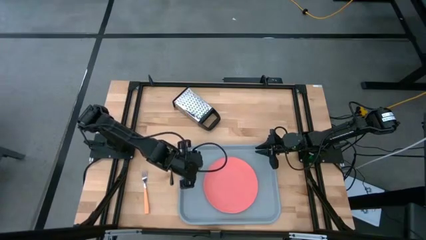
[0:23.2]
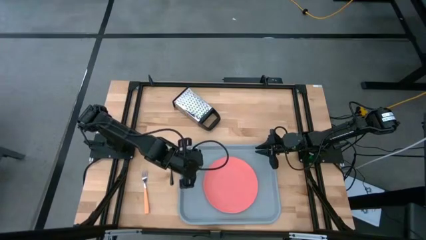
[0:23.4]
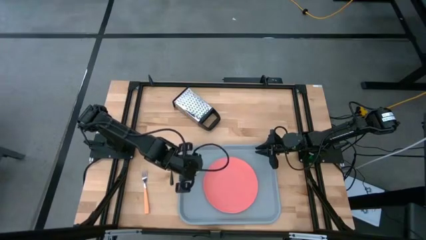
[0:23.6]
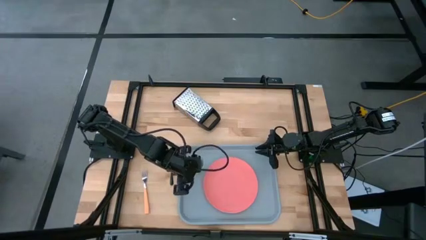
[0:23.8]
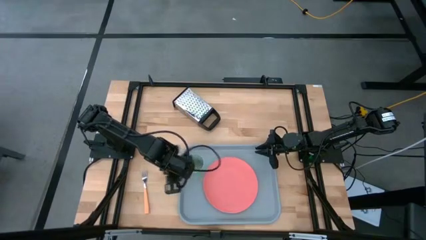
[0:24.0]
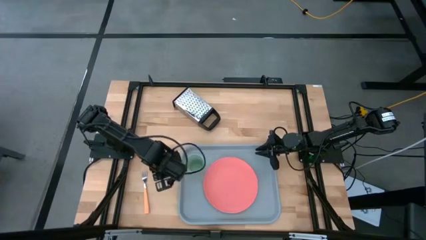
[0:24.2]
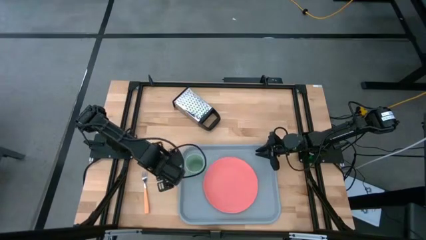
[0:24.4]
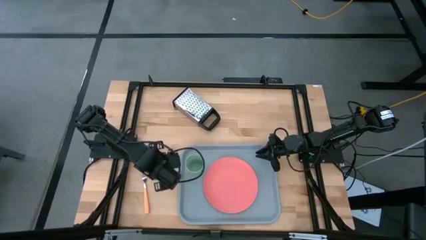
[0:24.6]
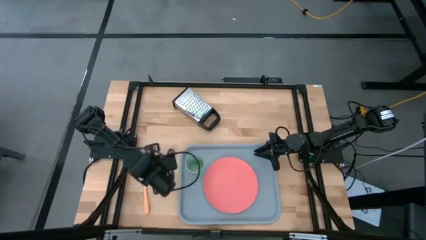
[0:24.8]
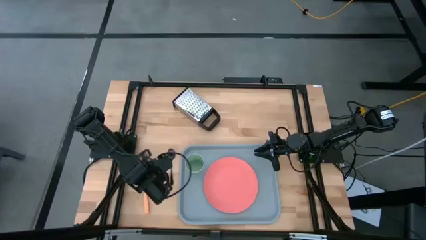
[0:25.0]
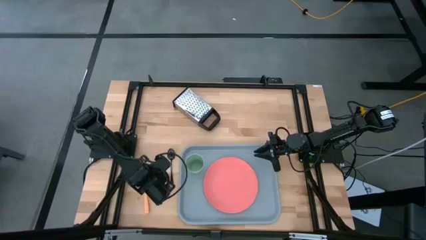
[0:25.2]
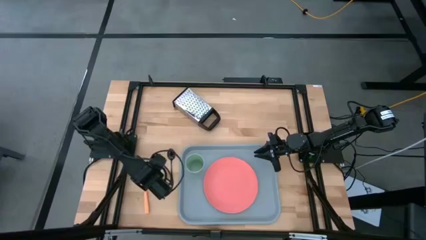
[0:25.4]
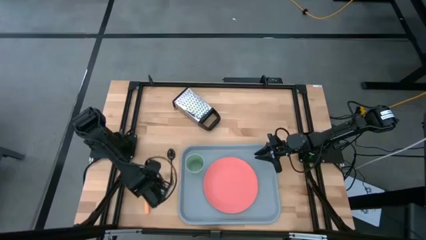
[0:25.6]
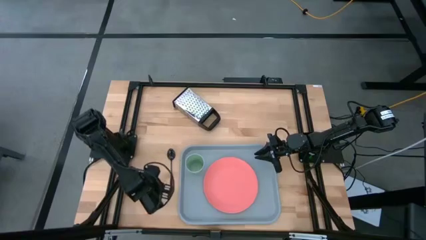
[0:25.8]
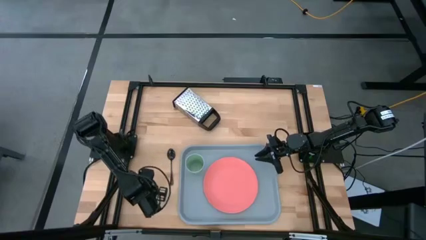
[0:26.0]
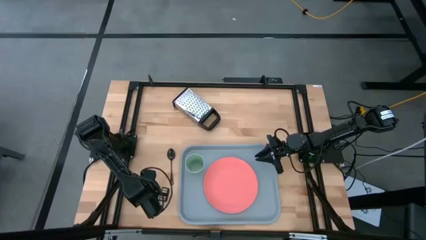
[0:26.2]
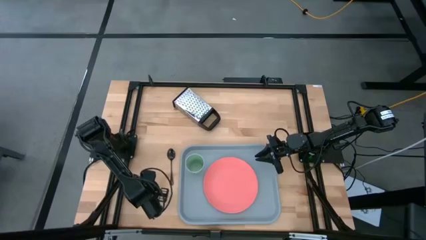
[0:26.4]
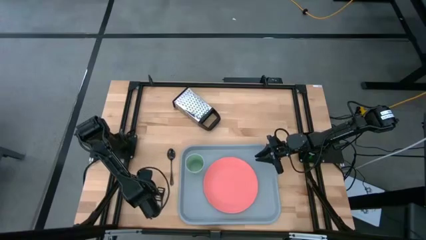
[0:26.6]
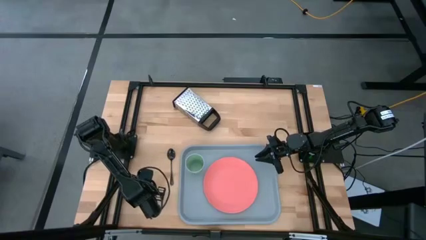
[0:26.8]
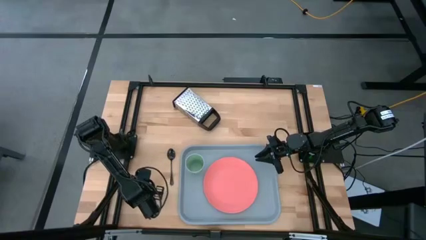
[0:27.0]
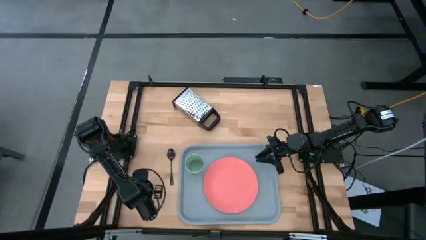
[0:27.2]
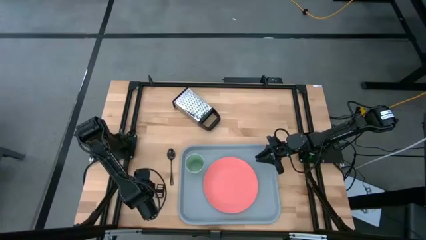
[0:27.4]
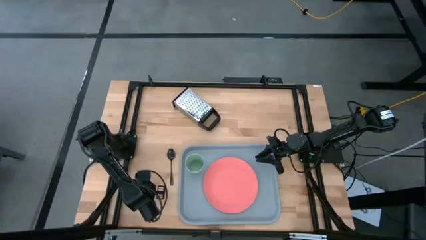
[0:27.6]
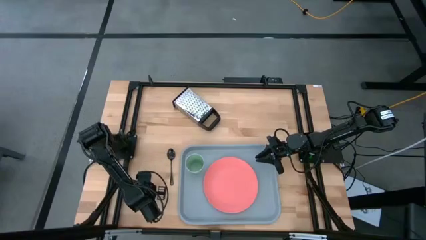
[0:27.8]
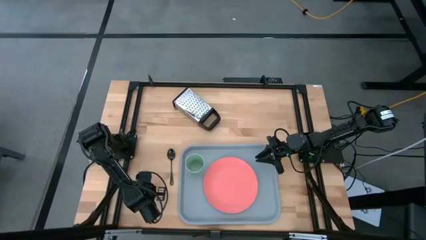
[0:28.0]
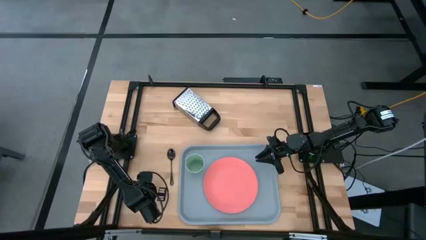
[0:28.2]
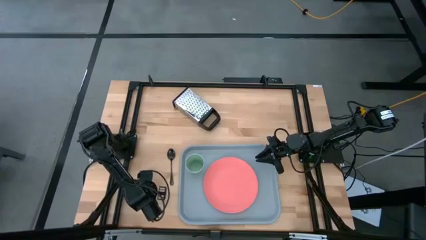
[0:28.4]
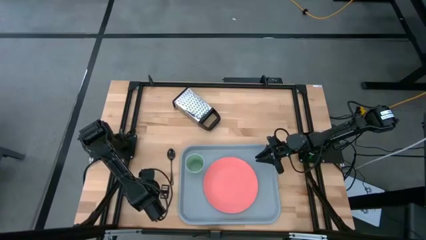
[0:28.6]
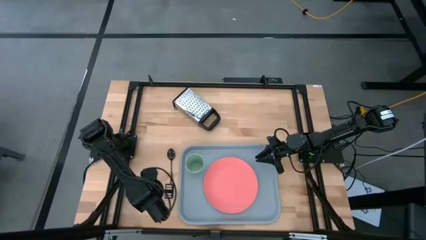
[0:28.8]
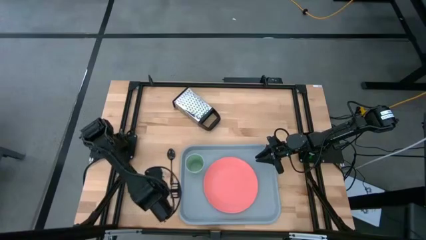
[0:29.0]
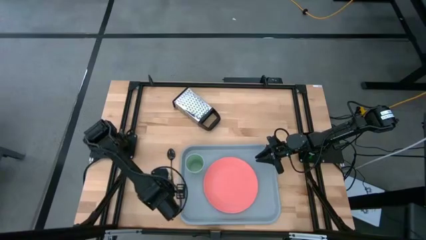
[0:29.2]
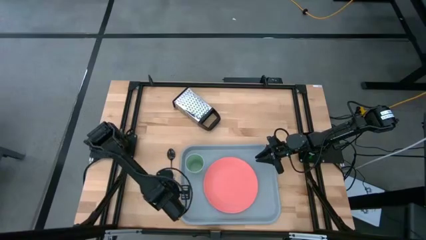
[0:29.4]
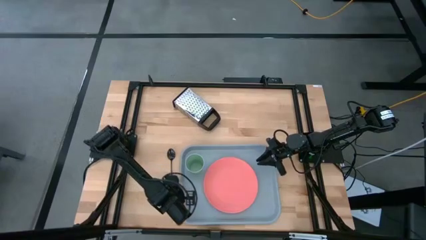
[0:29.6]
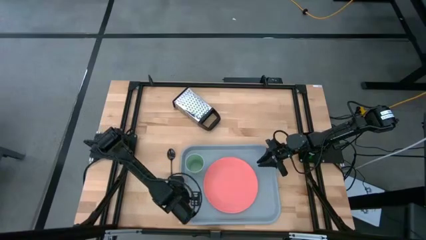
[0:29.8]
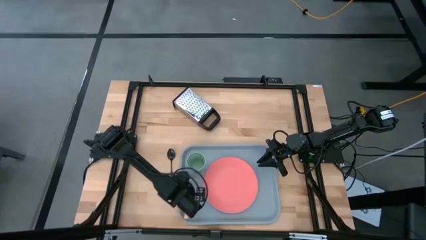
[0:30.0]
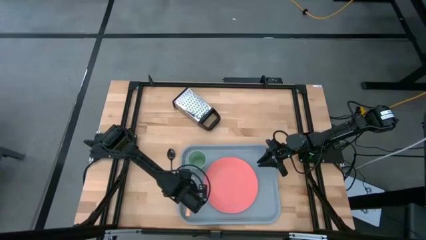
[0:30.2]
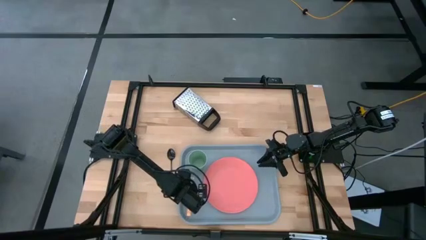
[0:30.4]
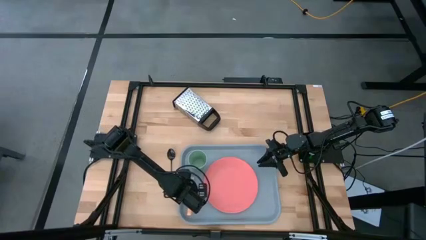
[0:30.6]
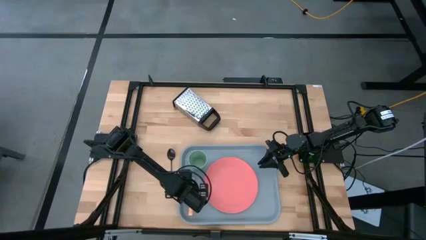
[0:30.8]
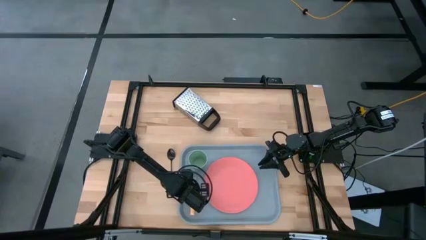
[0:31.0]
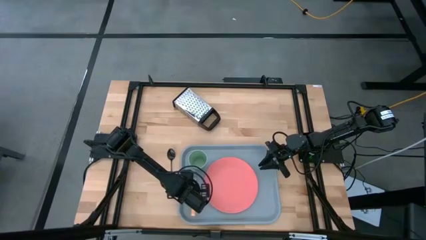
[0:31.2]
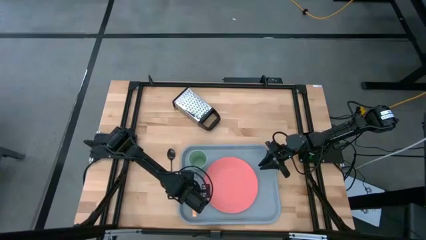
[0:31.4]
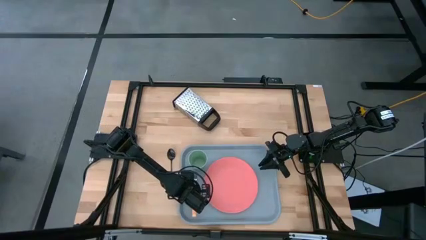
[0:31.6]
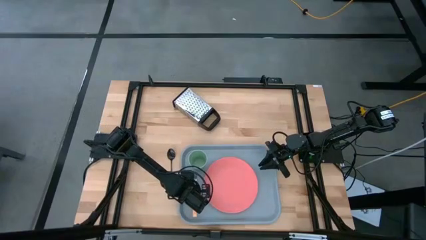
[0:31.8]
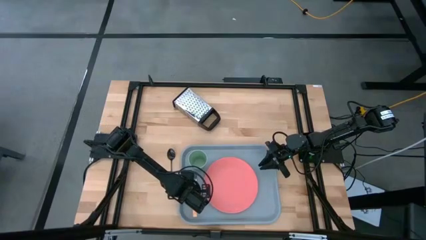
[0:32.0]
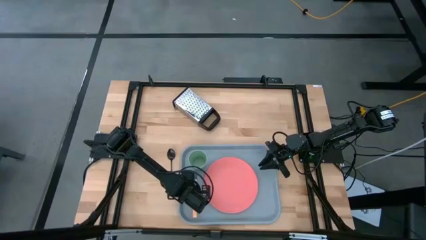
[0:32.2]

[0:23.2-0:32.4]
Task: Pick and place plate/cup/fork/spoon on tray
Put the fork on the serving tray to the left of the plate

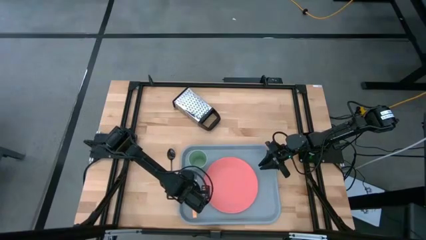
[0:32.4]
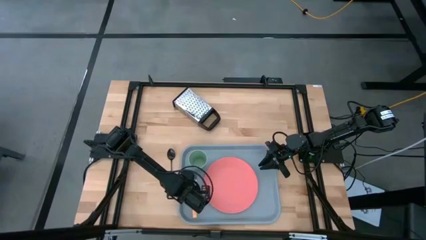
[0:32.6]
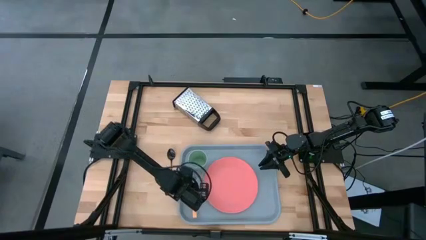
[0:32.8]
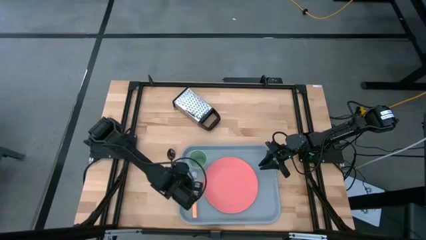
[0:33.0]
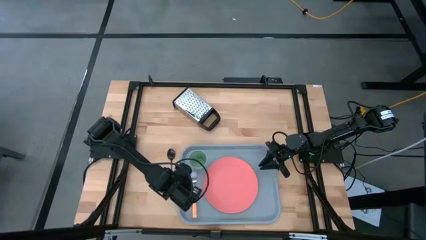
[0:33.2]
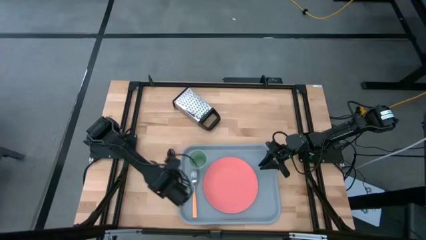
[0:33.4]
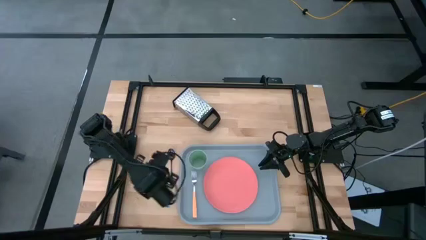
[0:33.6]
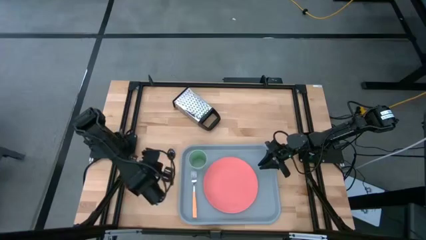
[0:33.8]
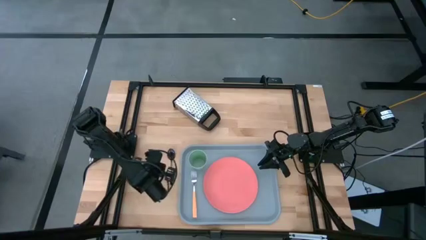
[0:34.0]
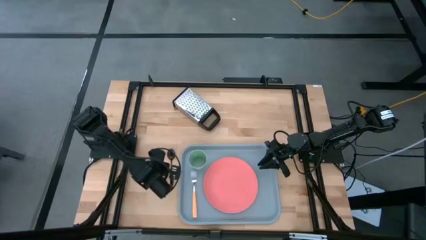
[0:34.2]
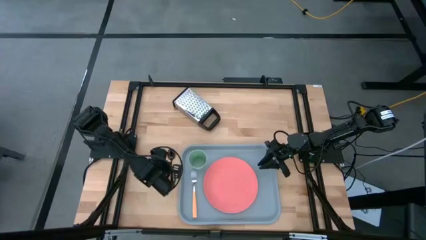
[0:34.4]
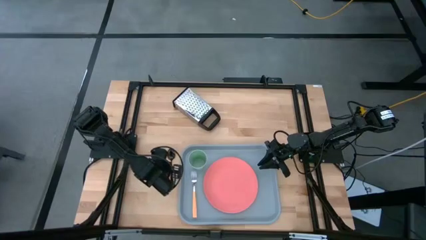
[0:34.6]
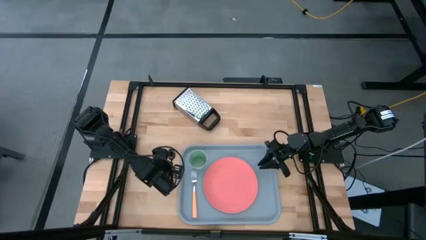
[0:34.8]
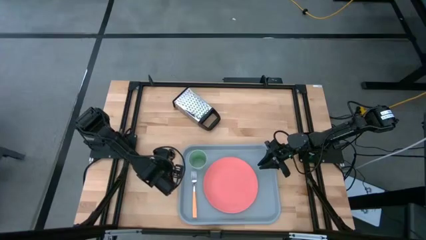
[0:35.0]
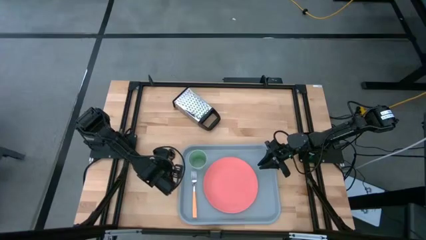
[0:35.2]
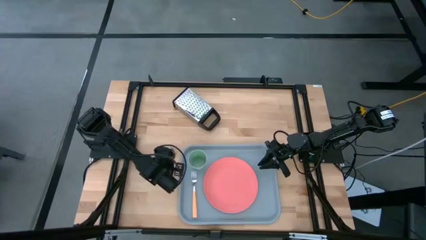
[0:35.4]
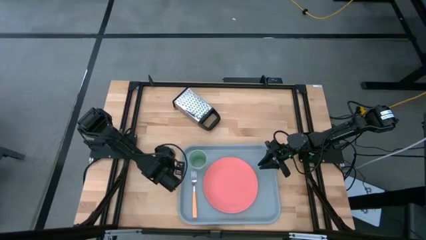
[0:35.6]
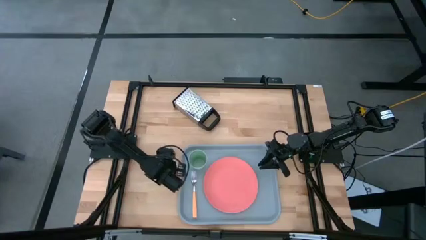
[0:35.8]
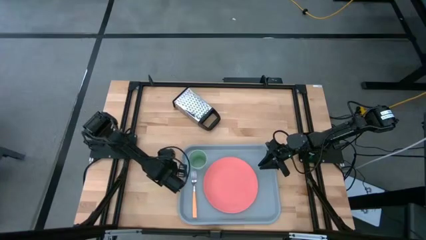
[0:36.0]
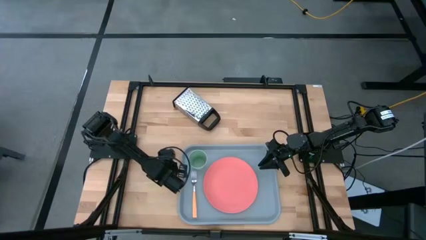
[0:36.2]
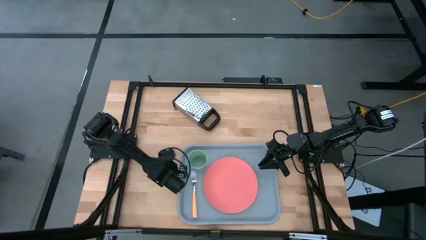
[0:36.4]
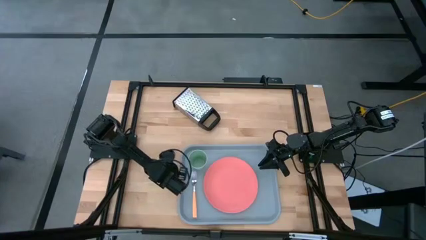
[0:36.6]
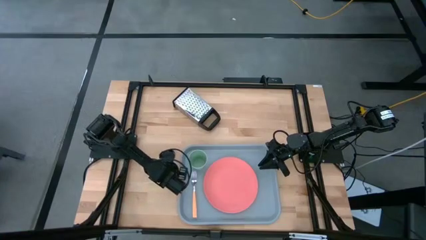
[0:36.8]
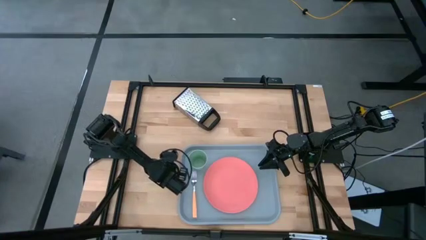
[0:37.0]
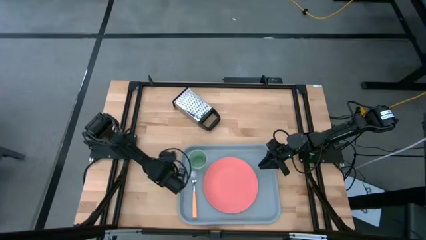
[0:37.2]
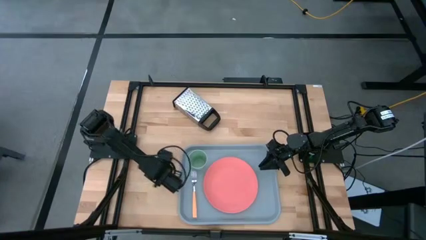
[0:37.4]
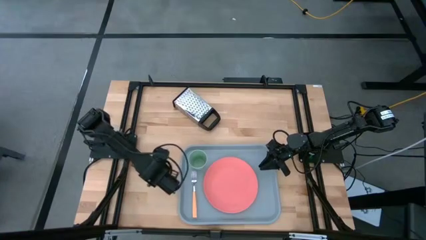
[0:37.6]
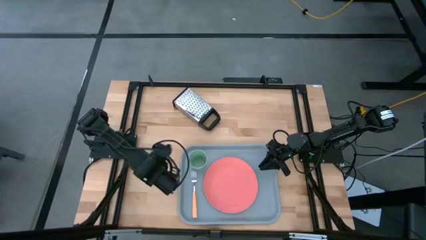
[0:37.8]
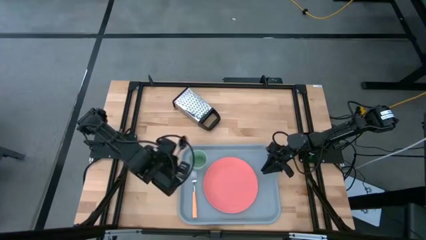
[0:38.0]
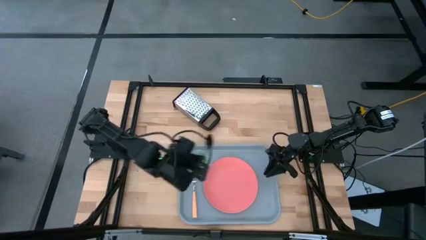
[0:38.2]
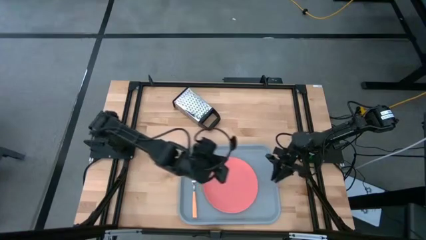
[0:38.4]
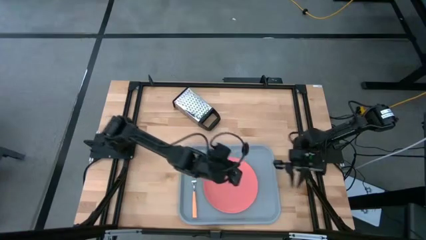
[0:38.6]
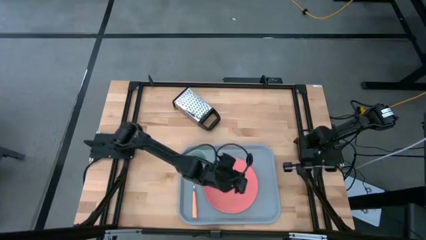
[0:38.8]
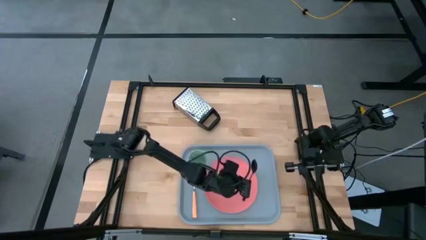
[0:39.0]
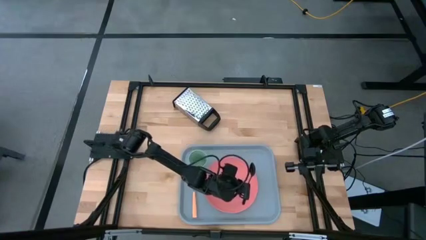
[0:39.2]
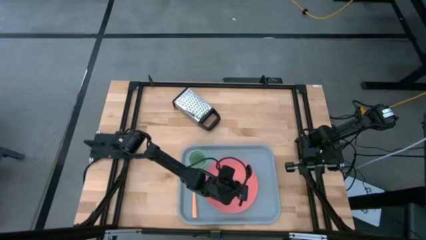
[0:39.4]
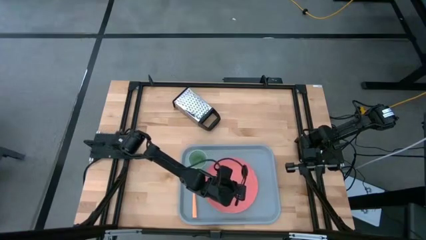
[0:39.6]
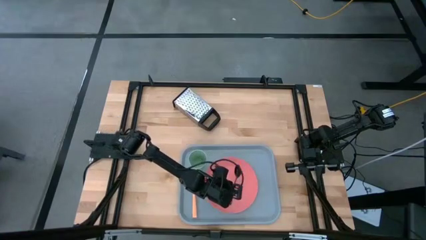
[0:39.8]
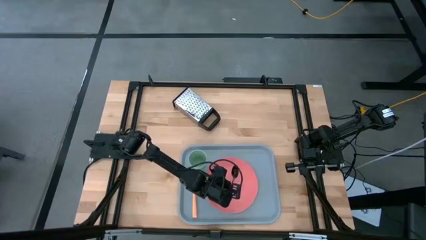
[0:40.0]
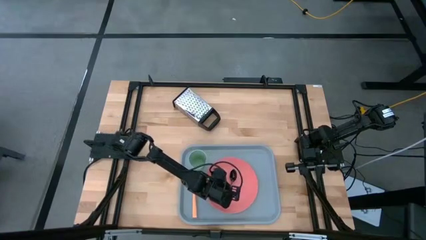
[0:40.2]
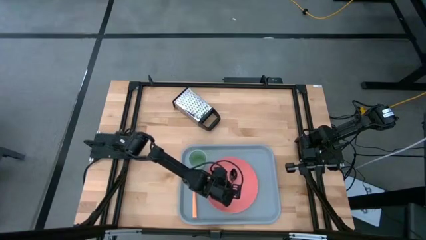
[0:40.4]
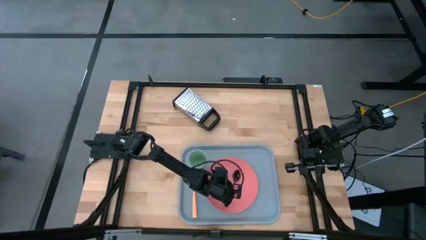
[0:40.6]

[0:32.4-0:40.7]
Put the spoon on the serving tray to the right of the plate

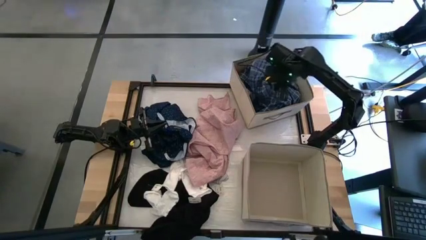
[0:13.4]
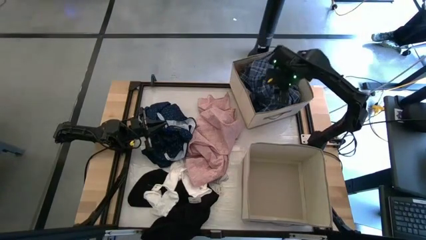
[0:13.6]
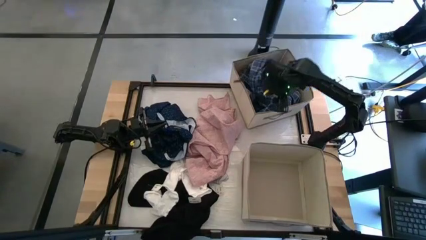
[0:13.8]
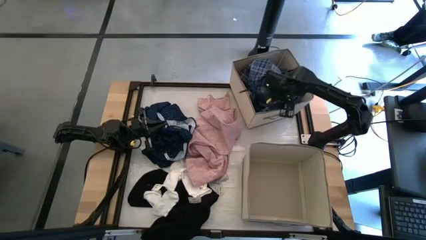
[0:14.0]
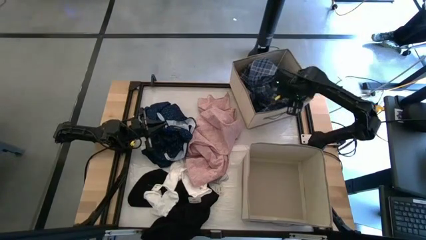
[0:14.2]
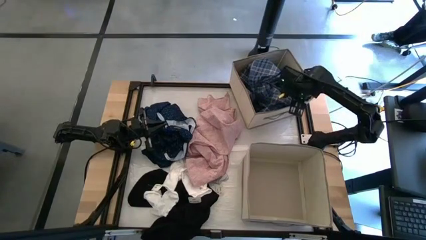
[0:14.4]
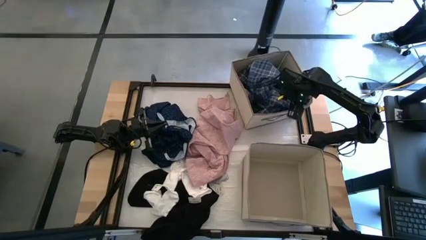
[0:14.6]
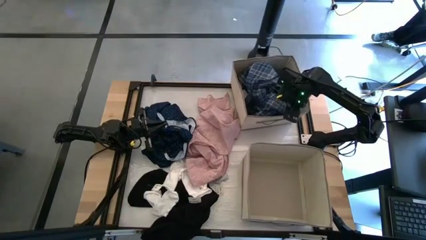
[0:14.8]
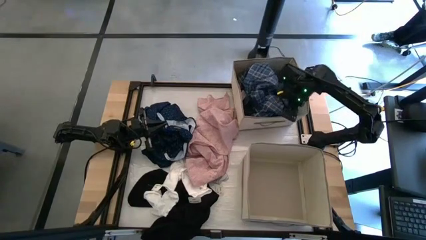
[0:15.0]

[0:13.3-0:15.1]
Task: Sort clothes
Adjust the top laundry organizer
